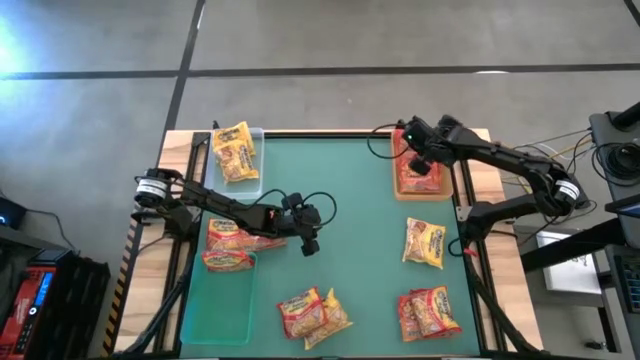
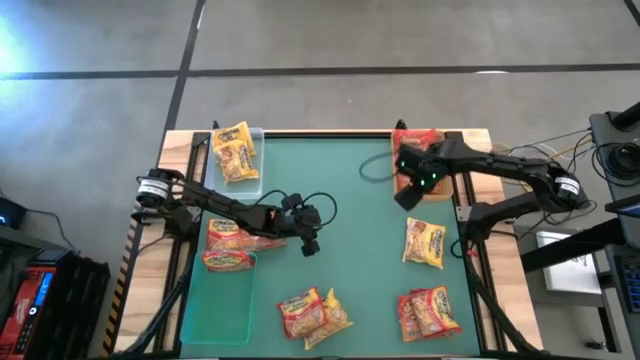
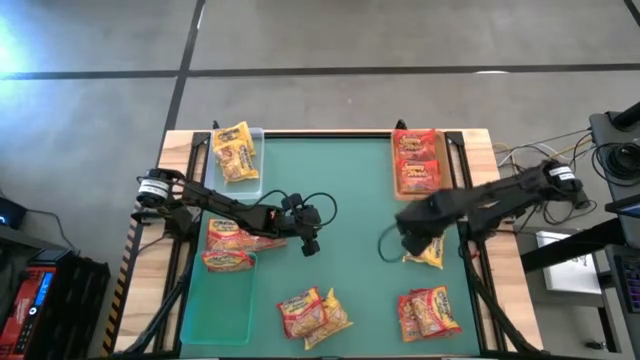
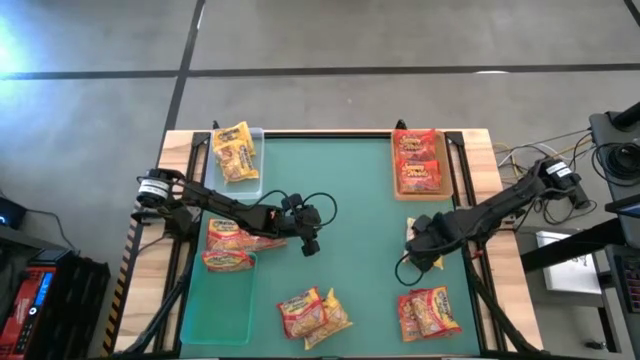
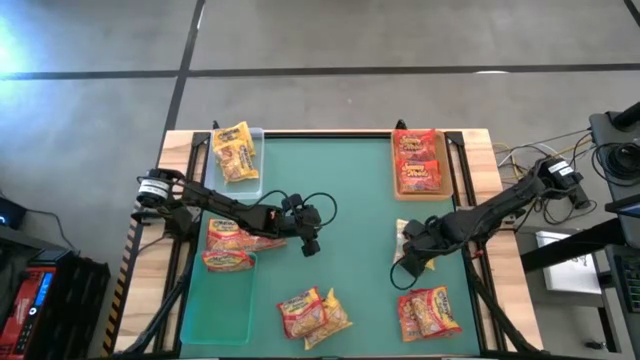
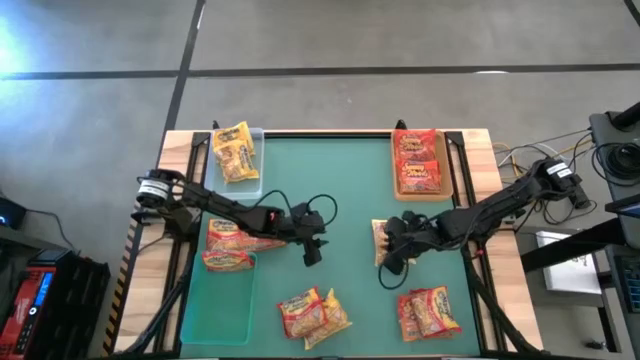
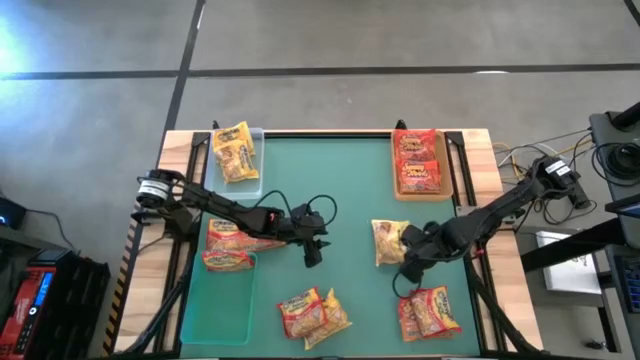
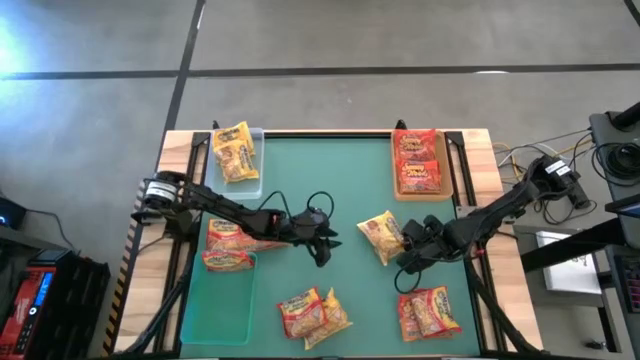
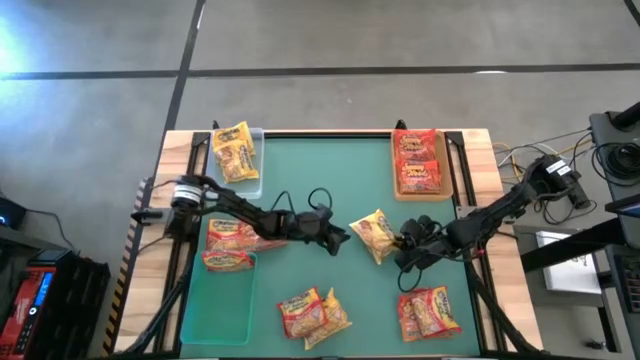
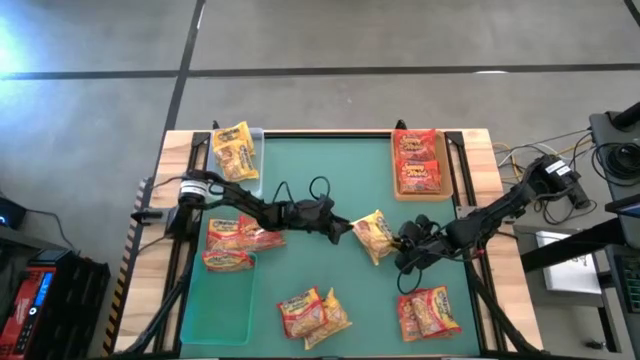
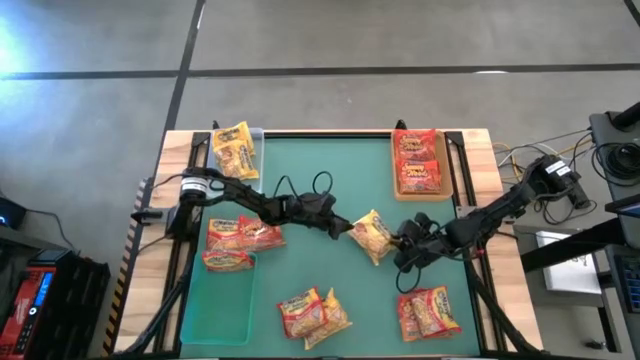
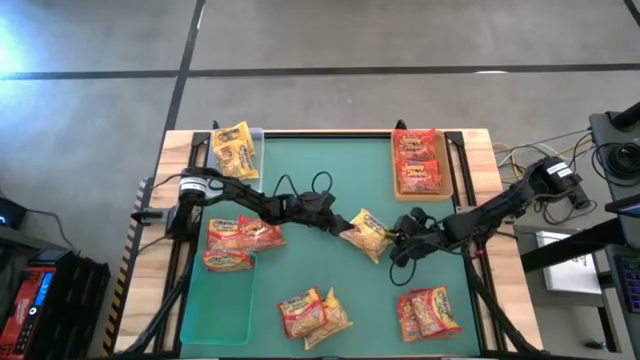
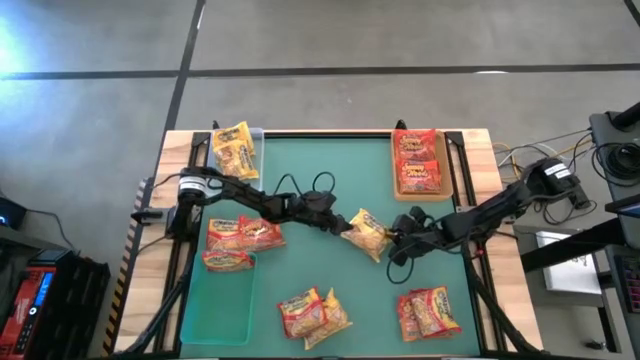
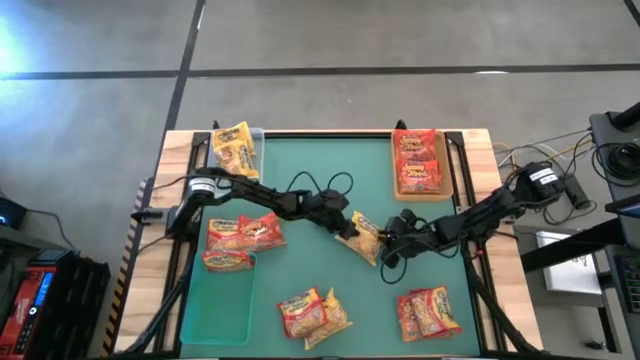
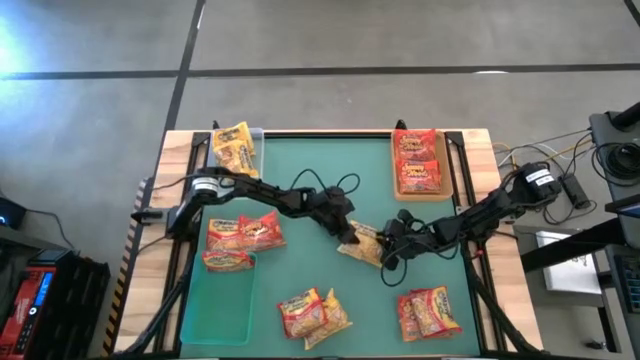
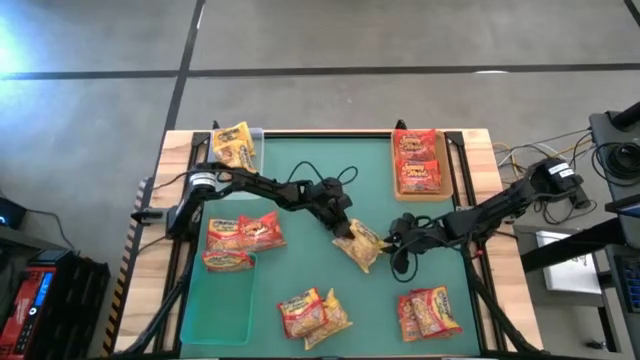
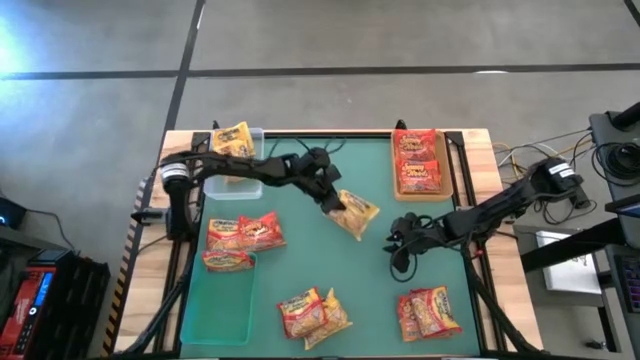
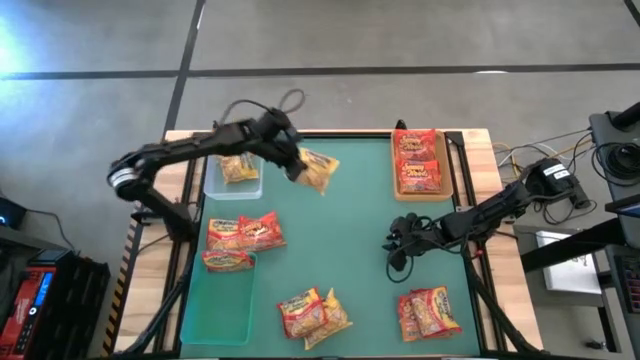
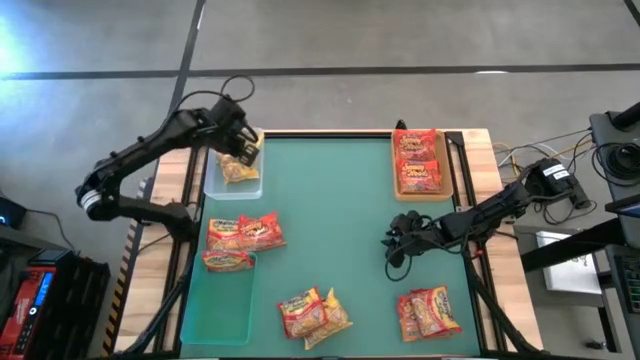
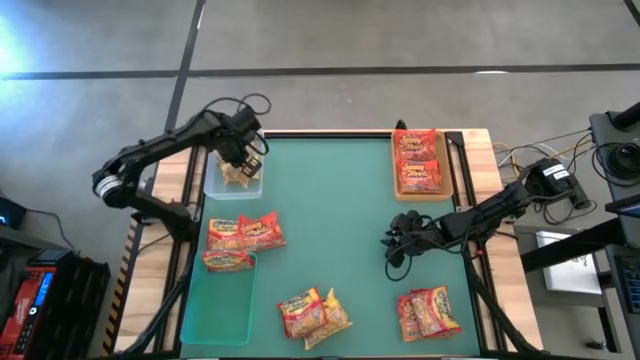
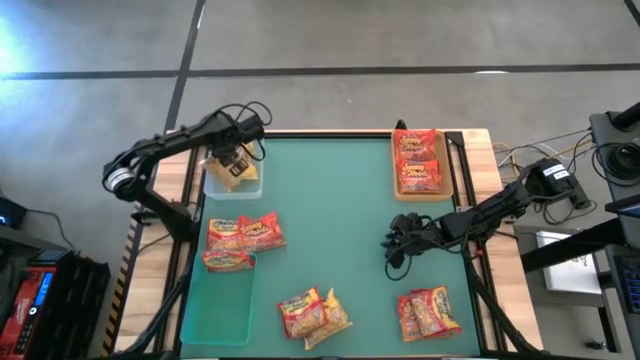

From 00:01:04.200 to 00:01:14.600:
Task: Sort Maruchan noodles
Put the yellow noodle pack into the transparent bin

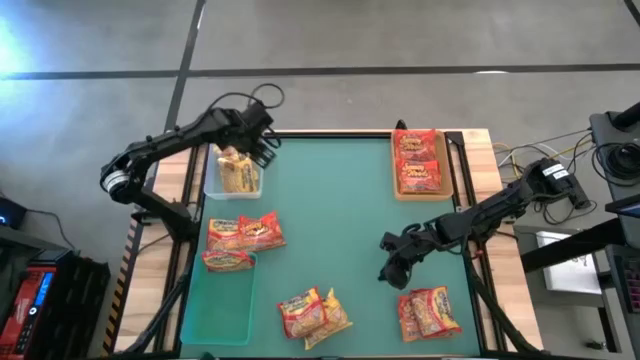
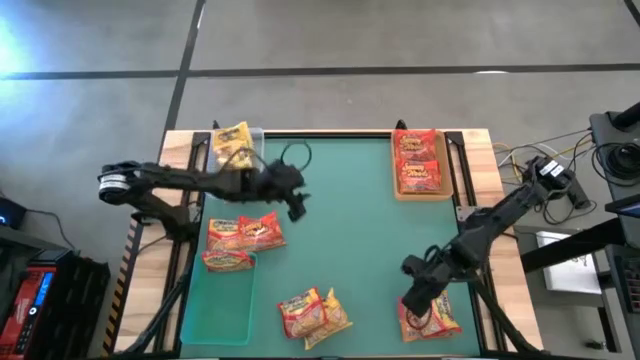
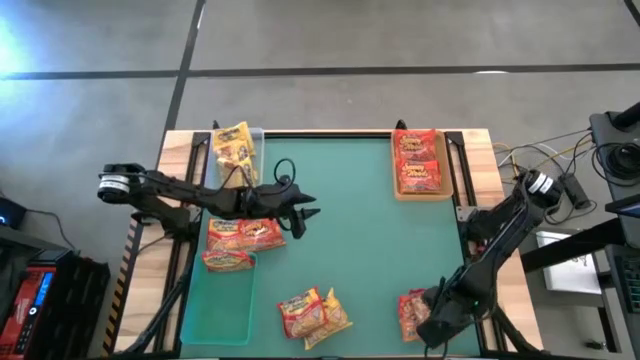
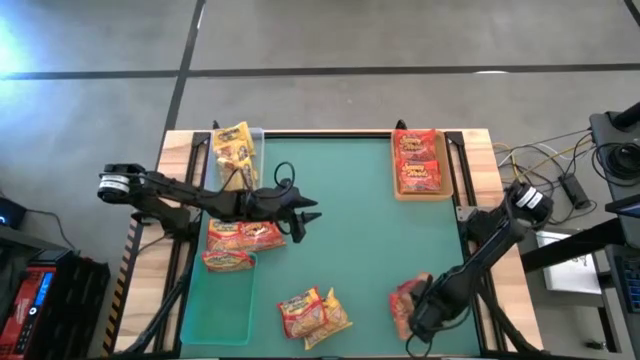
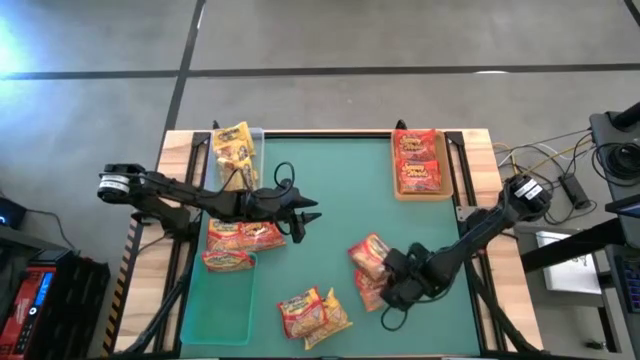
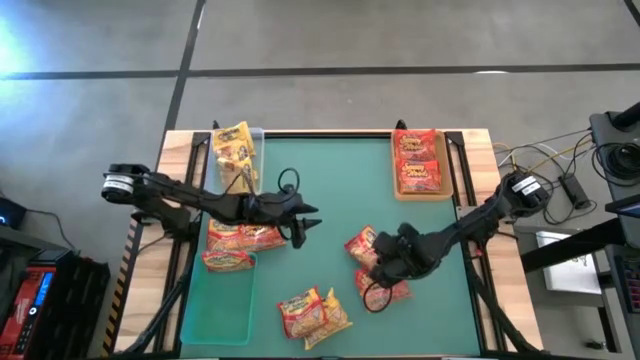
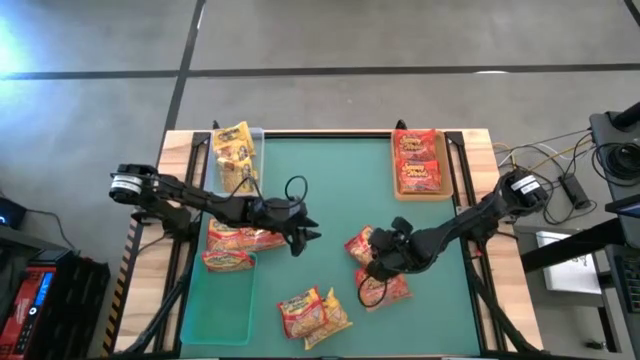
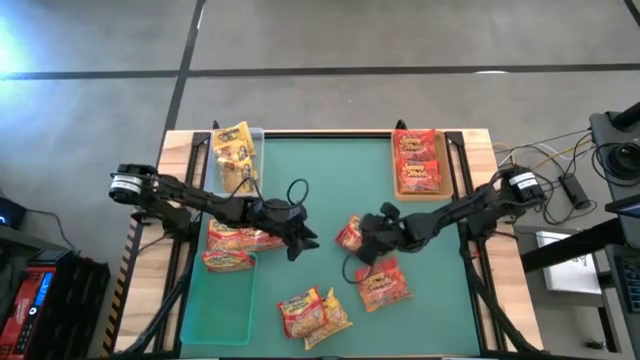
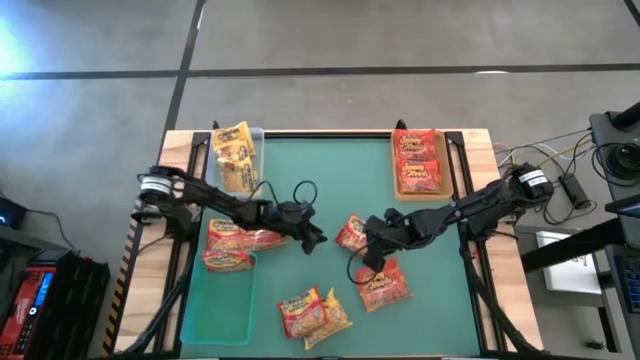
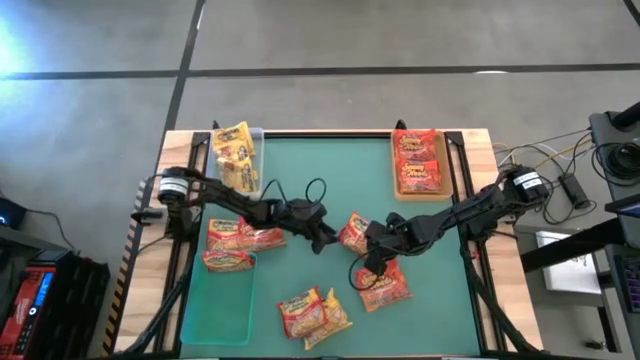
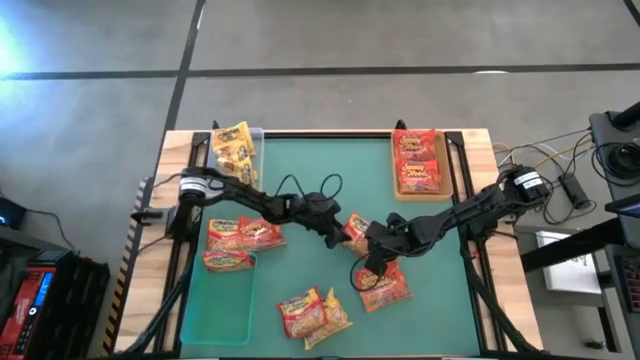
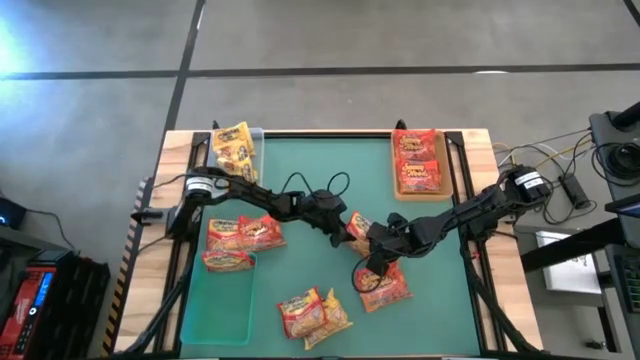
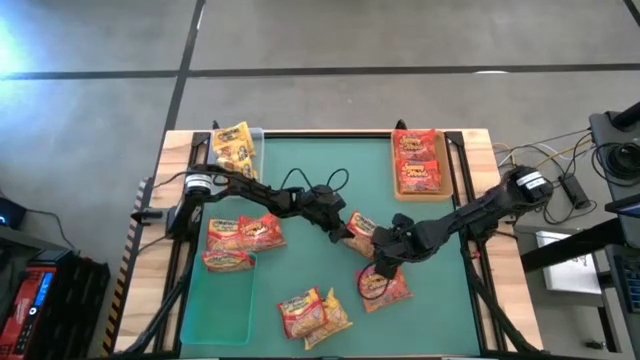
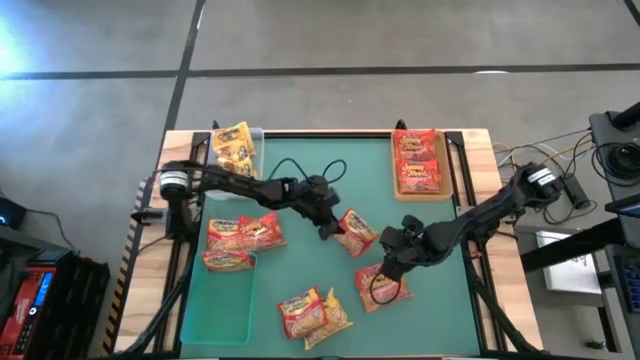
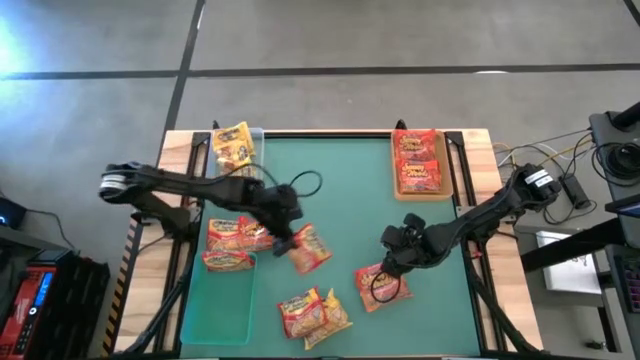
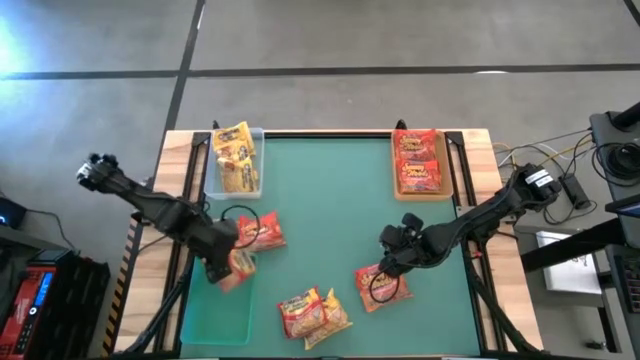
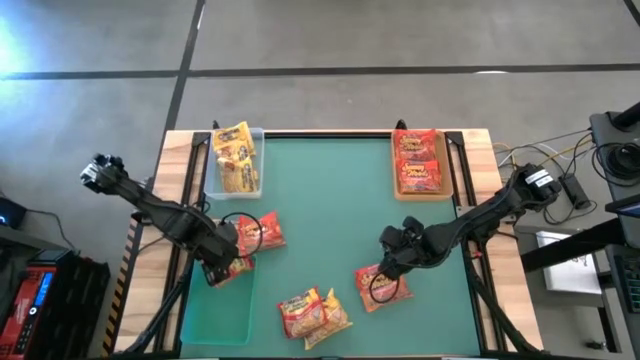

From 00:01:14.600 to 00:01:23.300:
Put the red noodle pack into the green bin

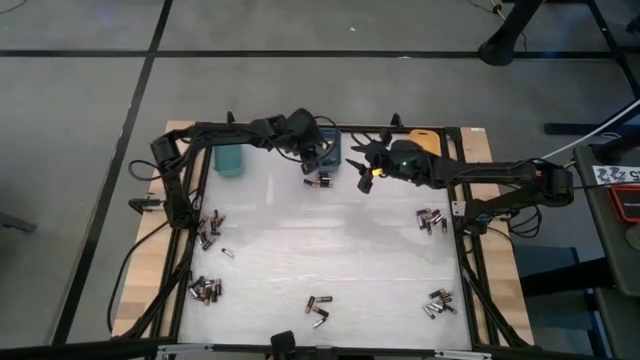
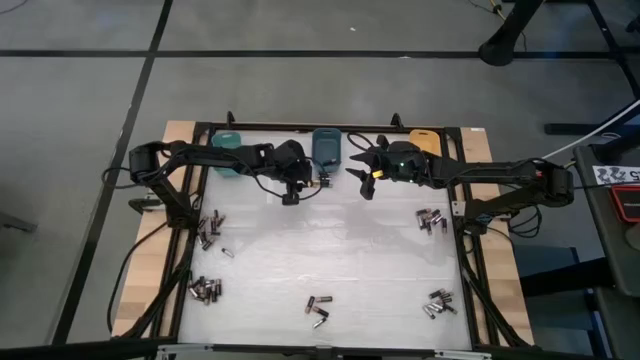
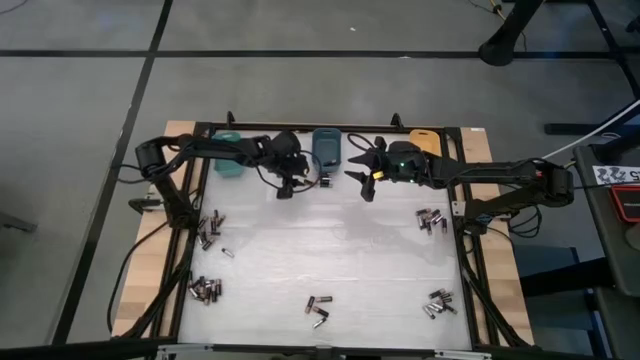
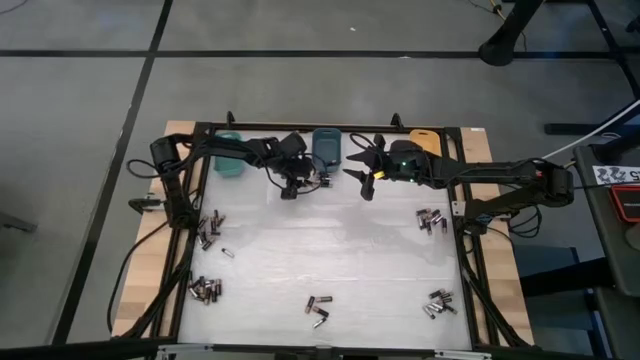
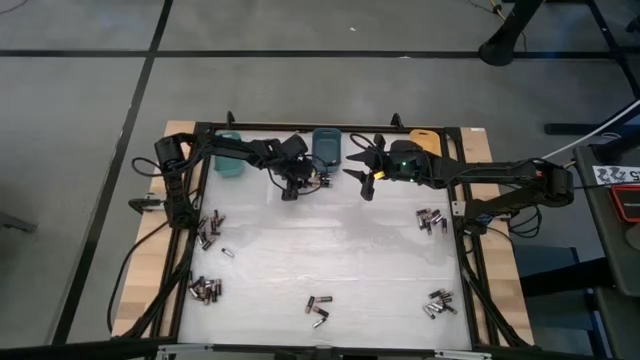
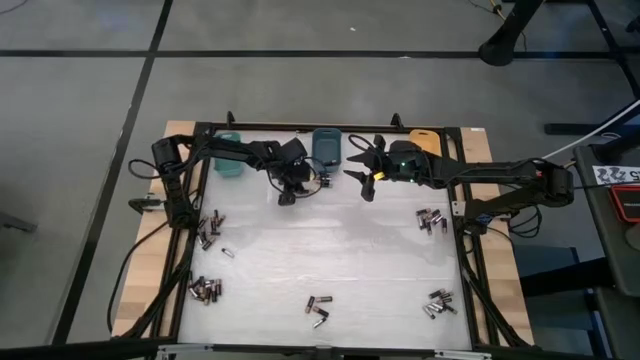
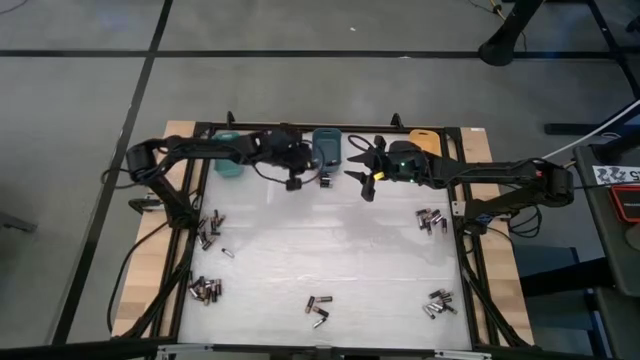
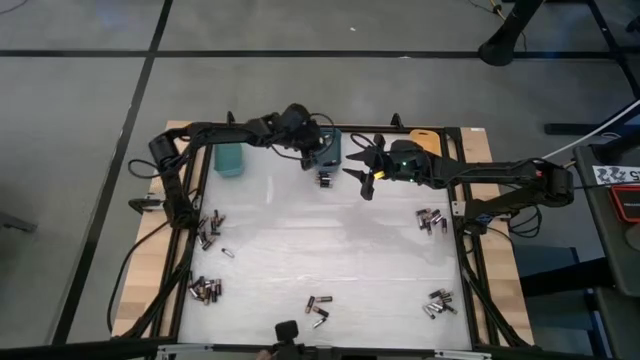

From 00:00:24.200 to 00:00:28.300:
Task: Sort batteries
Put the brown battery into the blue bin
